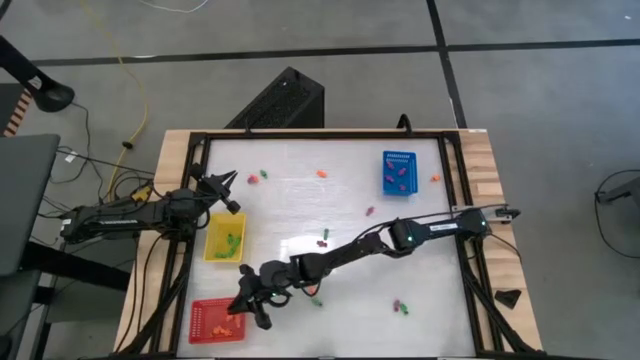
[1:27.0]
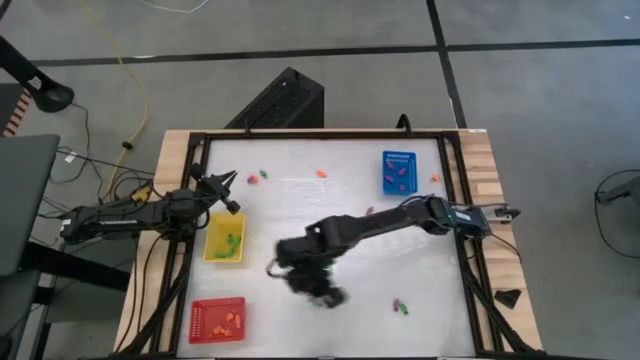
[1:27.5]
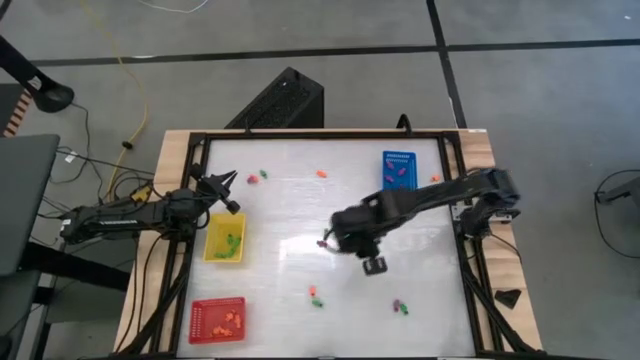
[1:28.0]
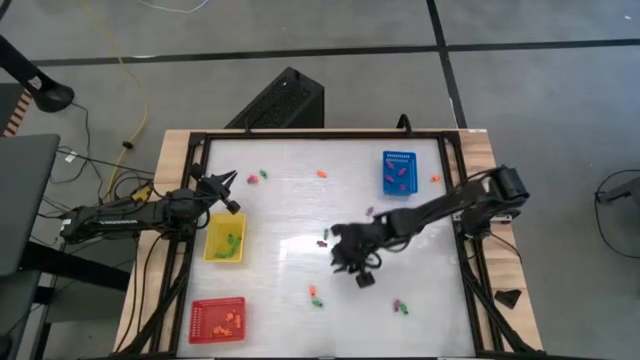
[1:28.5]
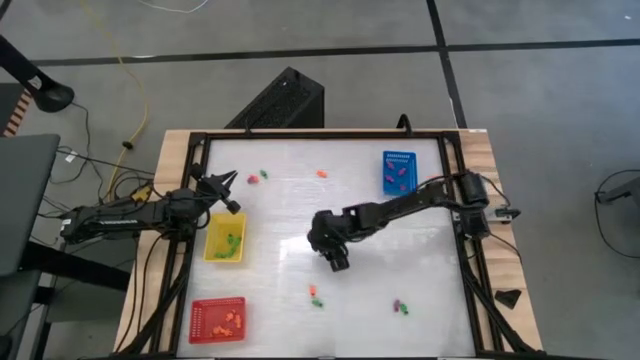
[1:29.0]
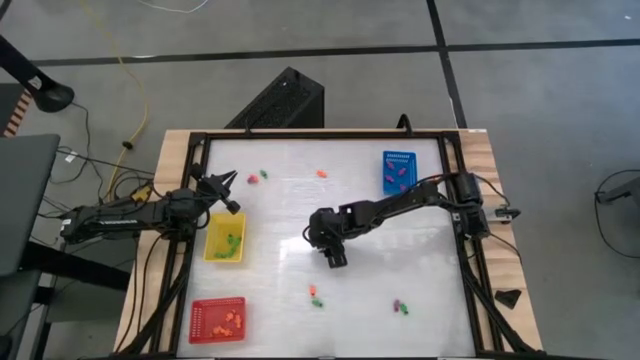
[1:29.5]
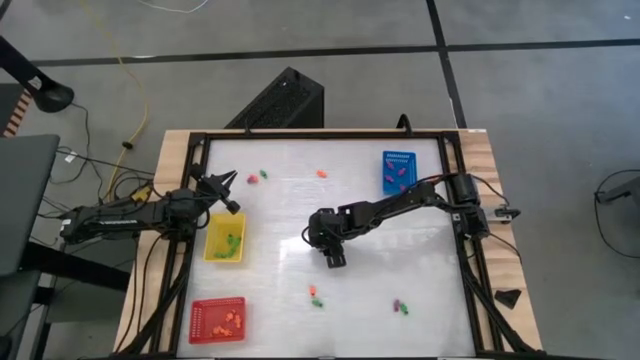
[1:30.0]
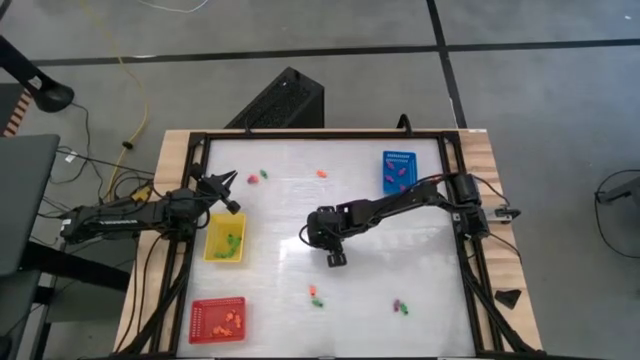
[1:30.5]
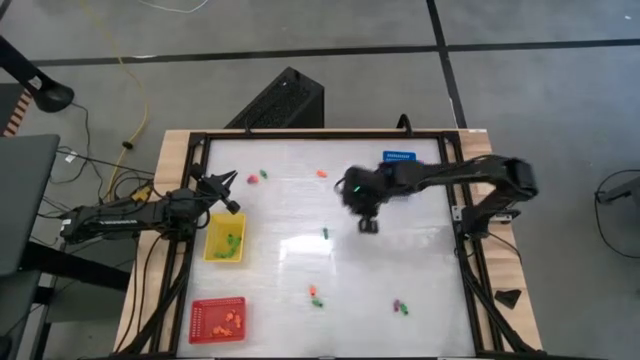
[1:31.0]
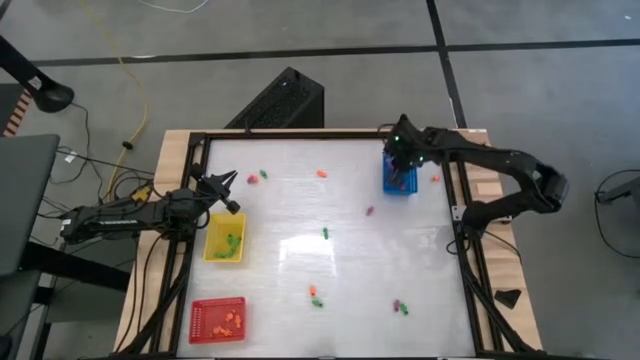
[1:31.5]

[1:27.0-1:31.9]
Task: Sort Halloween decoration
Put the purple skeleton toy into the blue bin

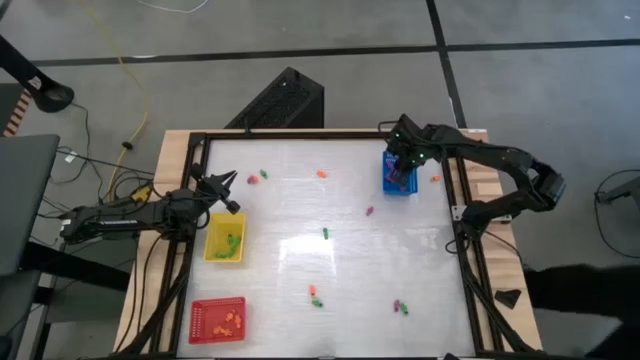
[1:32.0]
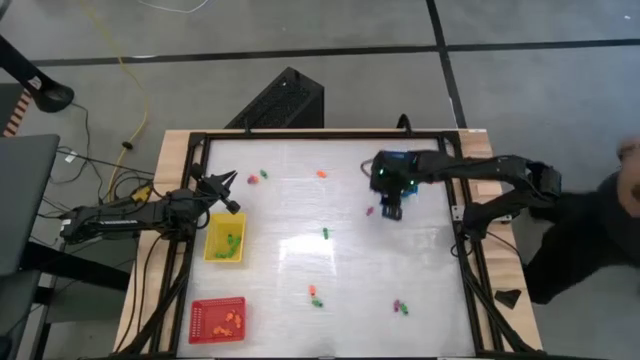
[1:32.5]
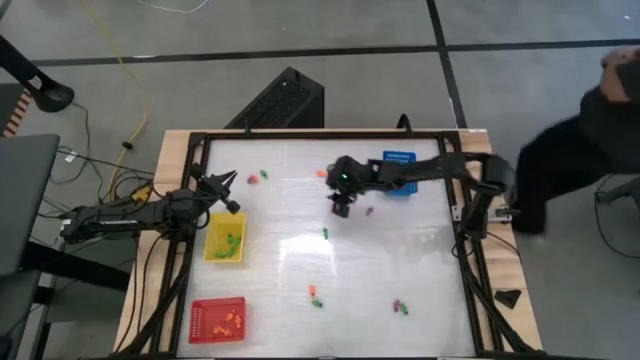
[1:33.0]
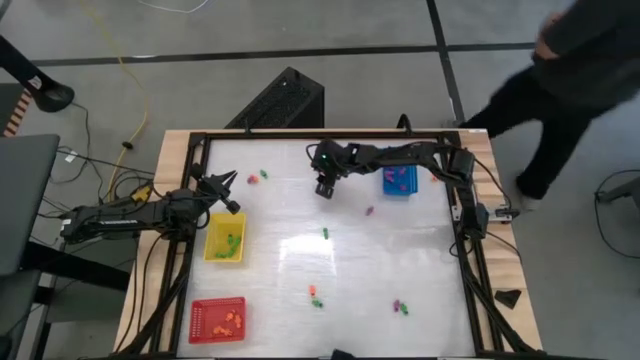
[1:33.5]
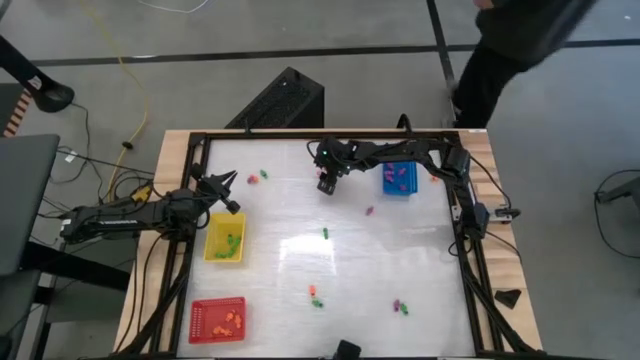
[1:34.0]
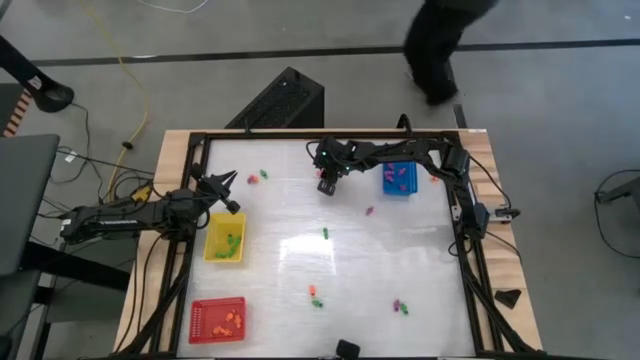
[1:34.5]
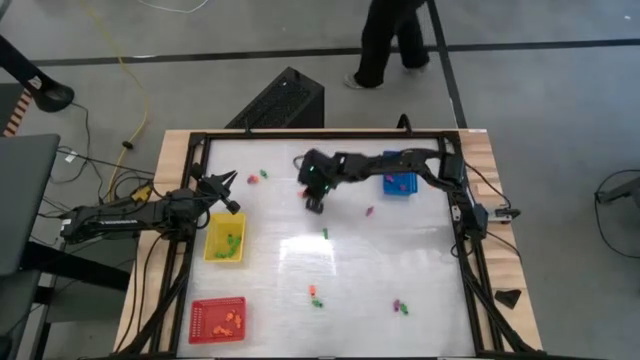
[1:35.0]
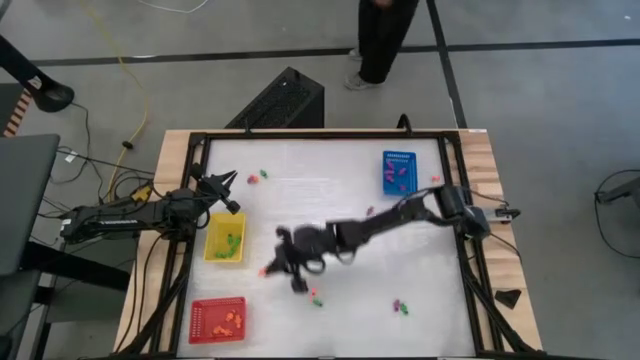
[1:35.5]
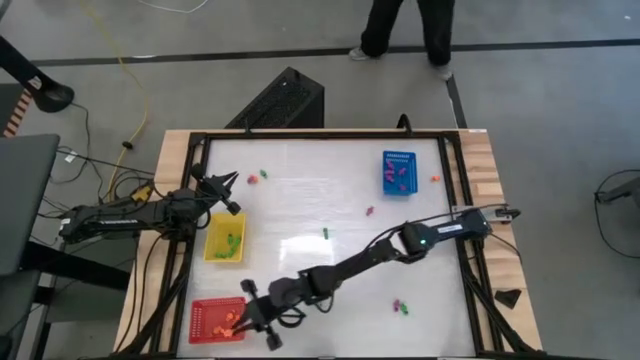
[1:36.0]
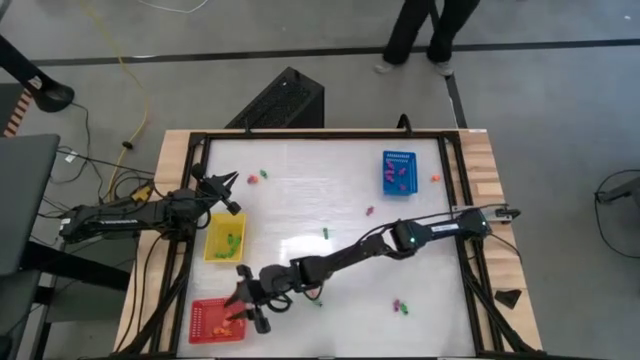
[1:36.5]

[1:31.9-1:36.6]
Put the orange skeleton toy into the red bin

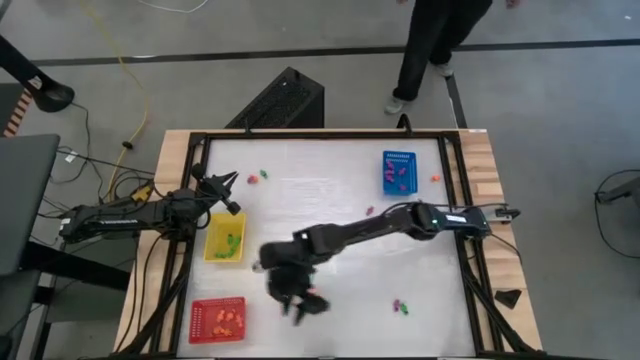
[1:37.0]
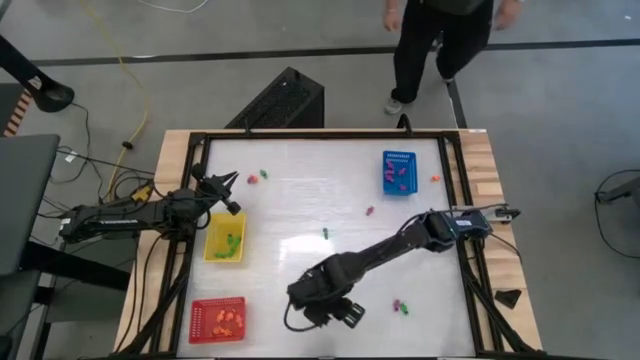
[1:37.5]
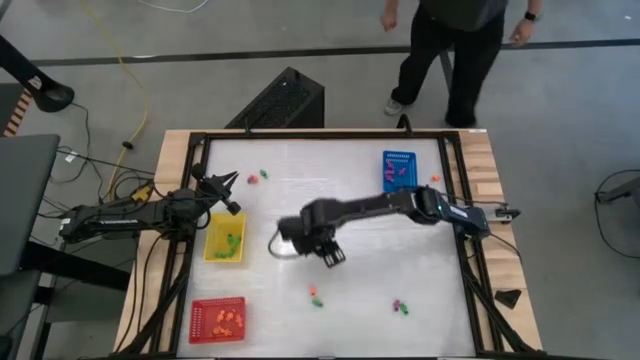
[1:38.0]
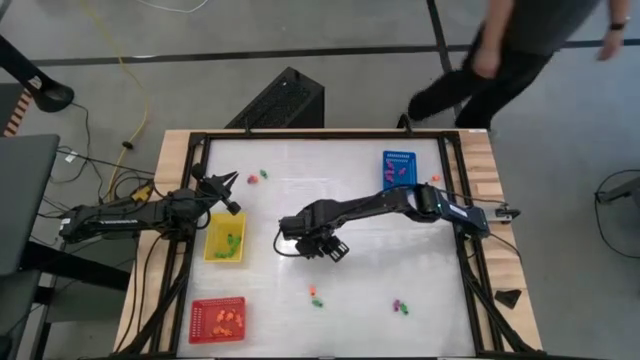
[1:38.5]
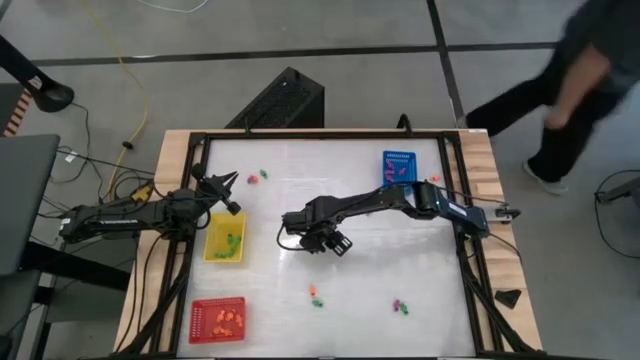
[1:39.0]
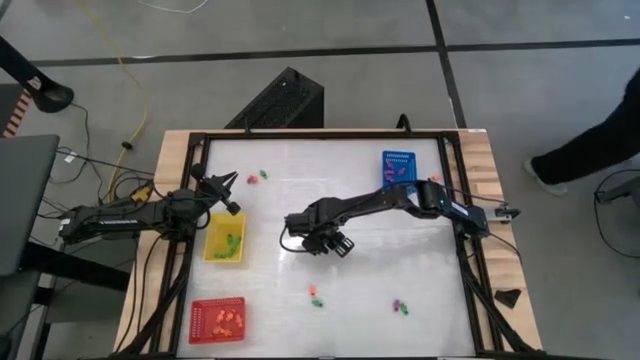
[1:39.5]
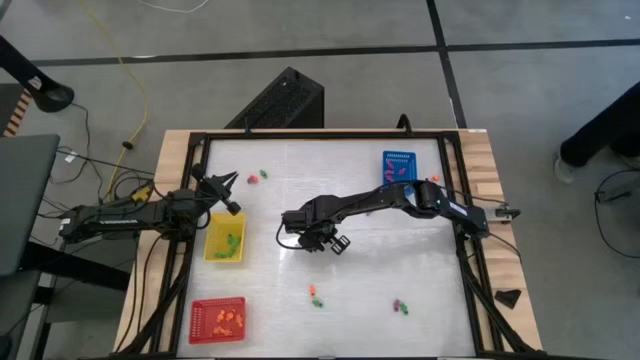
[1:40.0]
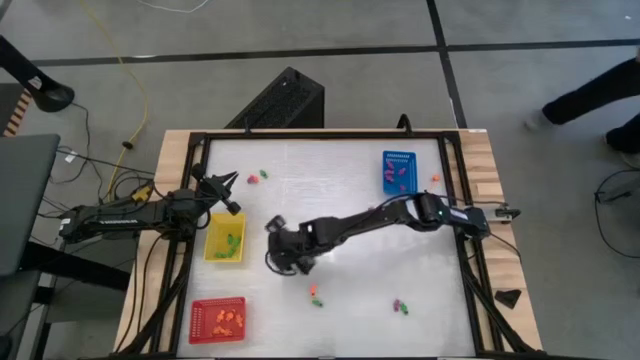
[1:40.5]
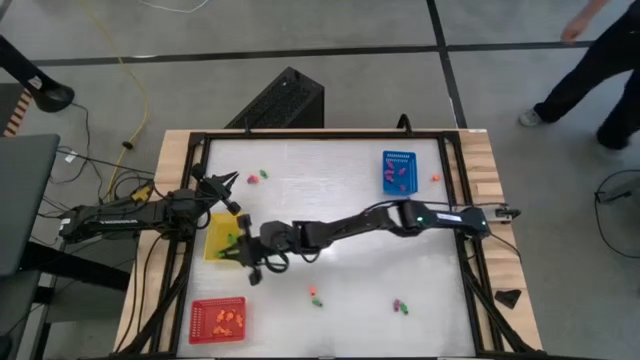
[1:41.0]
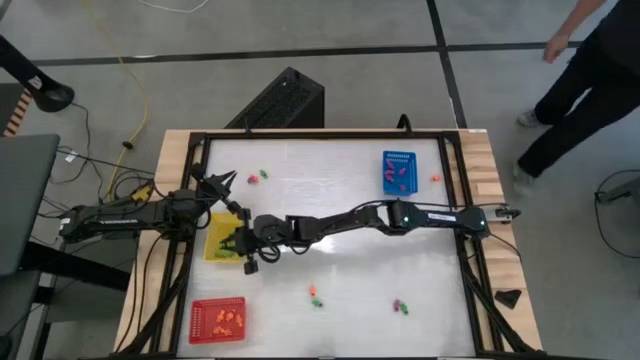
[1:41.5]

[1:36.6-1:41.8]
Put the green skeleton toy into the yellow bin

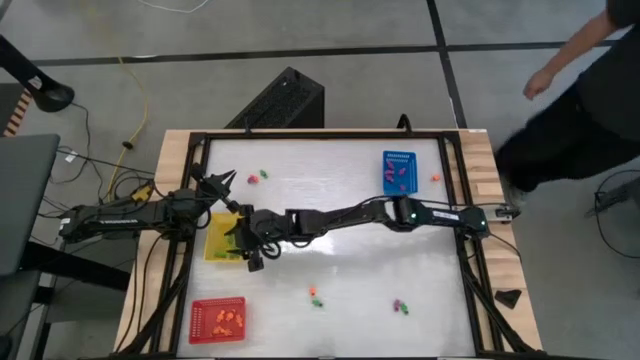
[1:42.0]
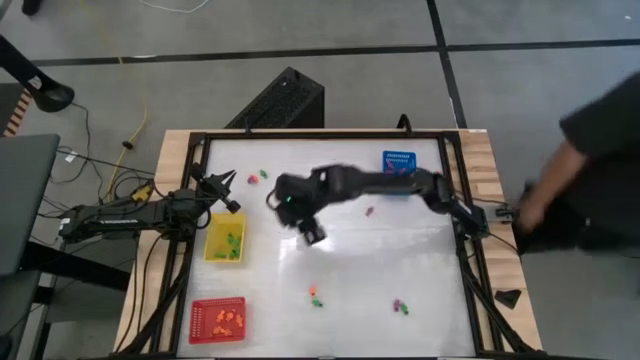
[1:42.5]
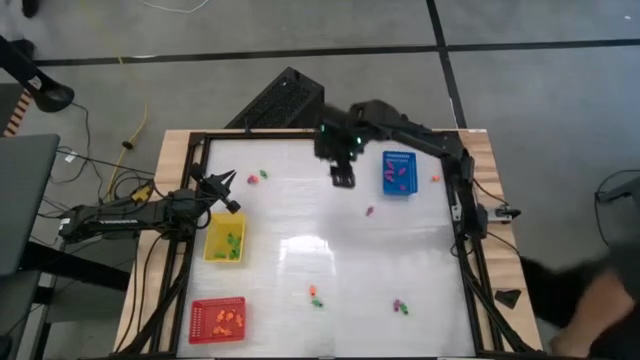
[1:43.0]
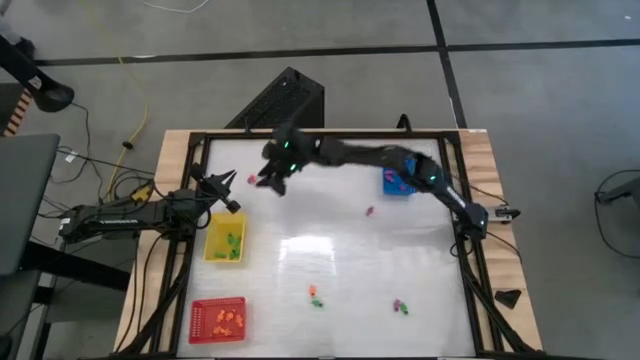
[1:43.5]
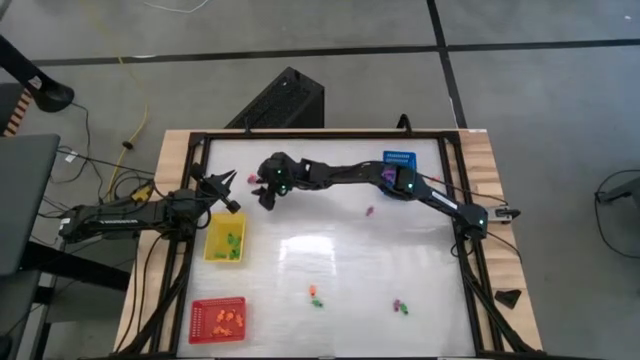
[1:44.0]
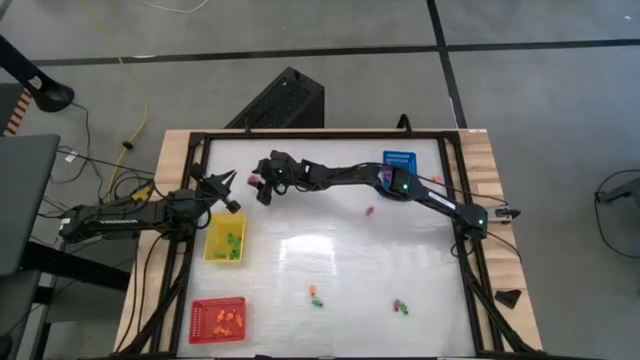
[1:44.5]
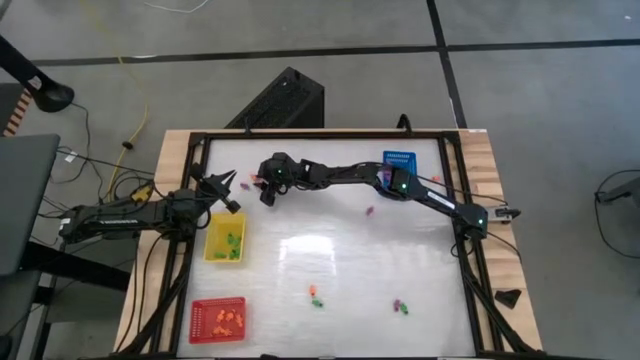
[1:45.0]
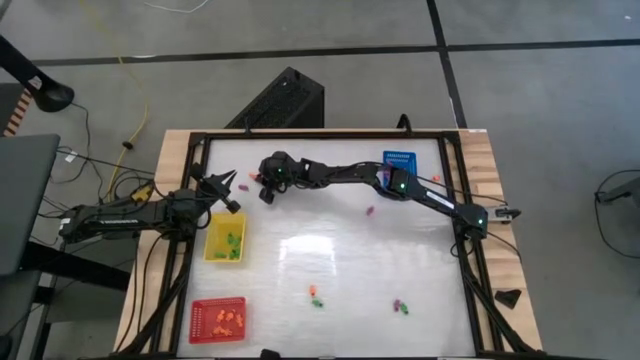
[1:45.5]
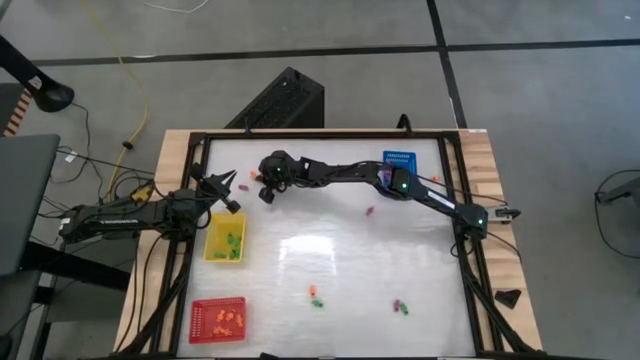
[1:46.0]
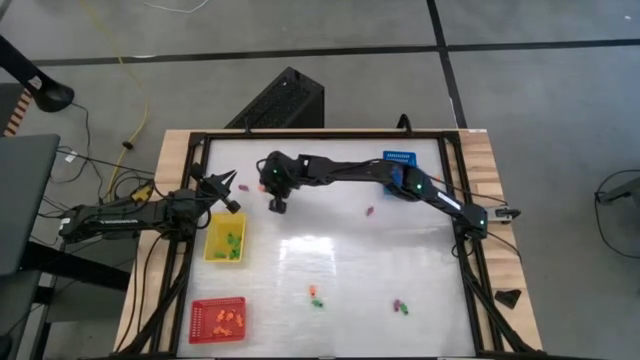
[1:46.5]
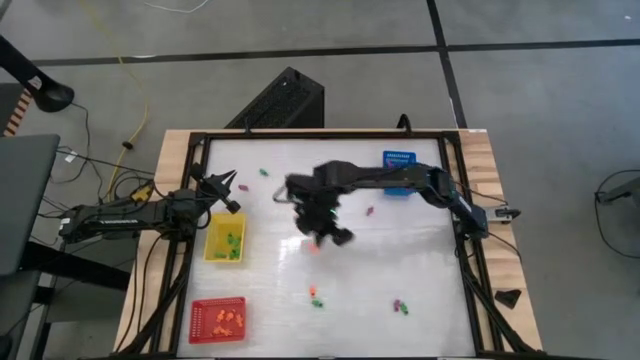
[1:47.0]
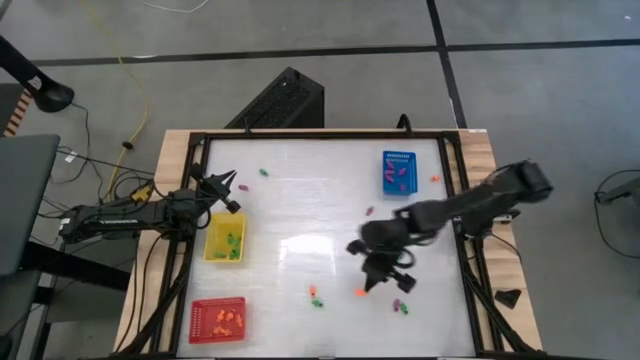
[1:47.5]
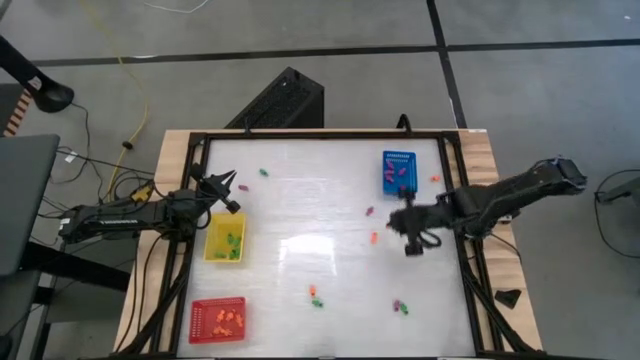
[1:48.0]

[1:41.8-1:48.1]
Put the orange skeleton toy into the red bin

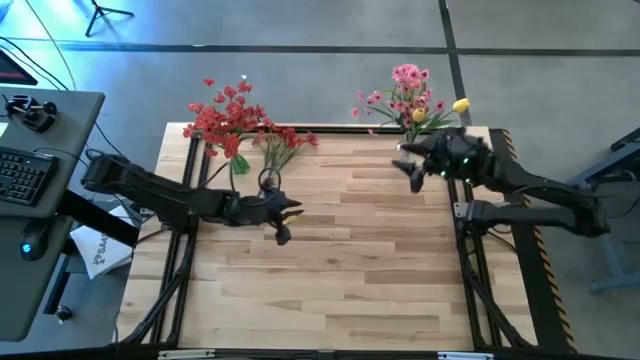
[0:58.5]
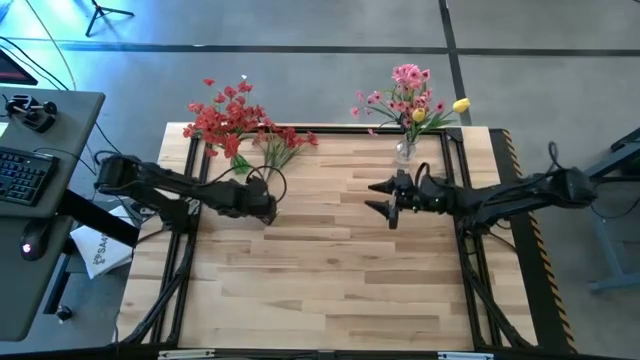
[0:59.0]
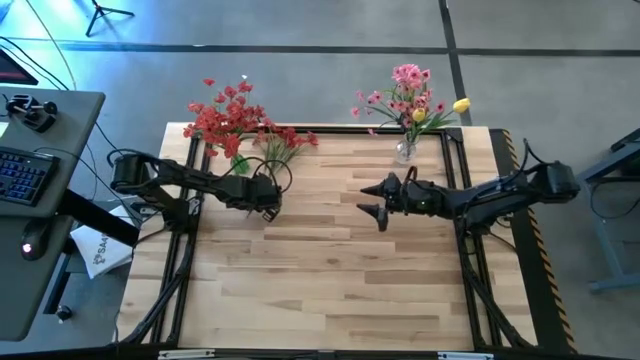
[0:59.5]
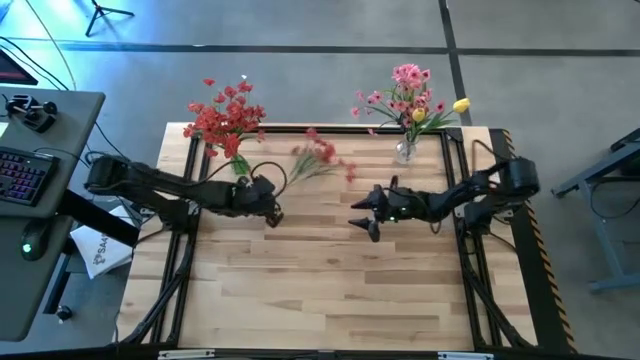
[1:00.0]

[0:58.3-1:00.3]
Task: Sort flowers into vase by color
Put the red flowers into the green vase
